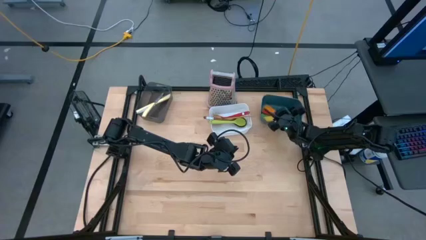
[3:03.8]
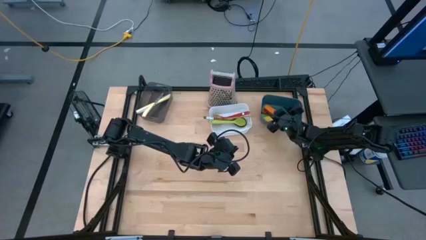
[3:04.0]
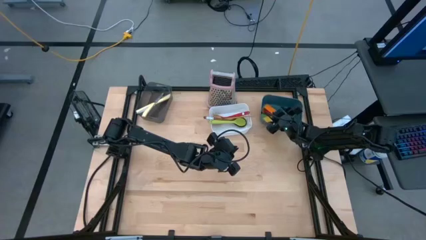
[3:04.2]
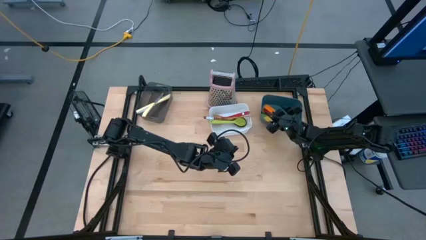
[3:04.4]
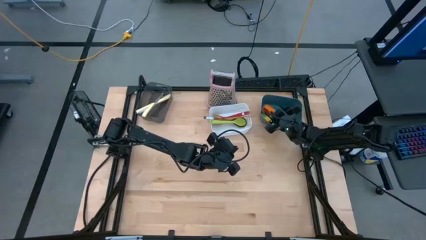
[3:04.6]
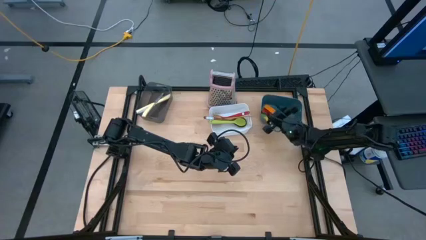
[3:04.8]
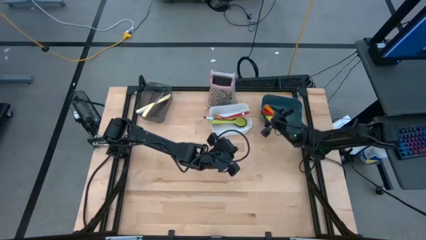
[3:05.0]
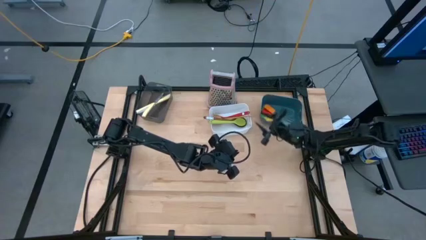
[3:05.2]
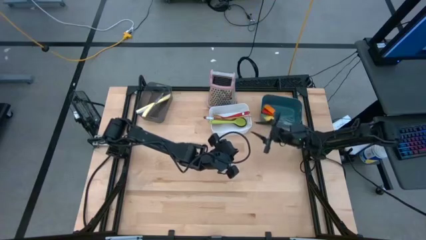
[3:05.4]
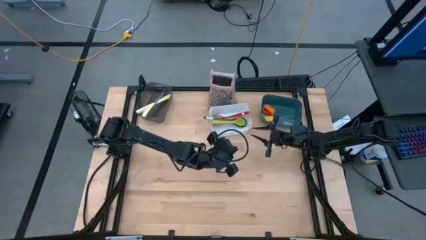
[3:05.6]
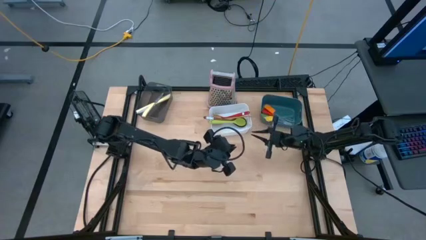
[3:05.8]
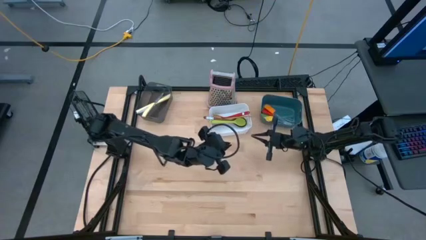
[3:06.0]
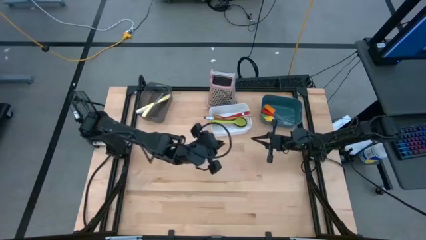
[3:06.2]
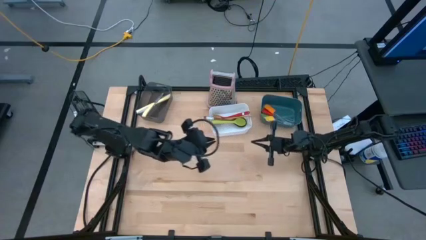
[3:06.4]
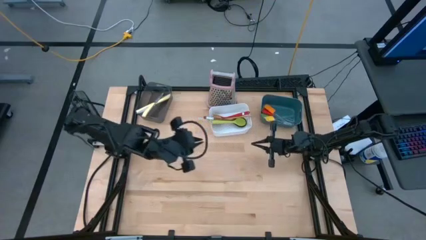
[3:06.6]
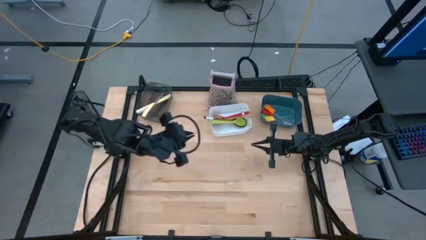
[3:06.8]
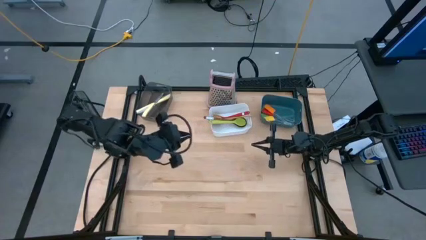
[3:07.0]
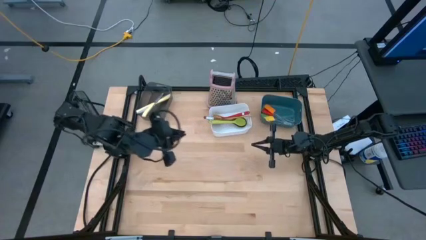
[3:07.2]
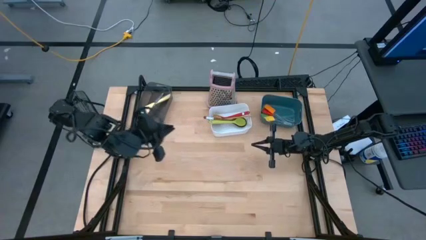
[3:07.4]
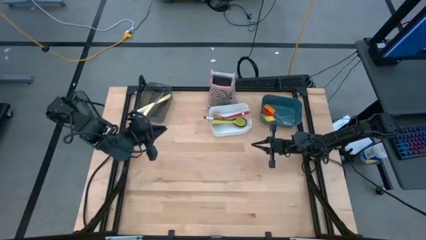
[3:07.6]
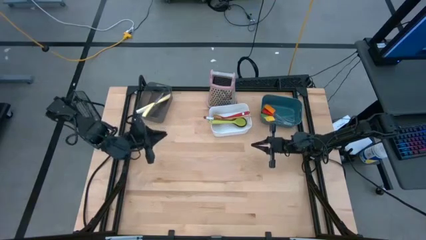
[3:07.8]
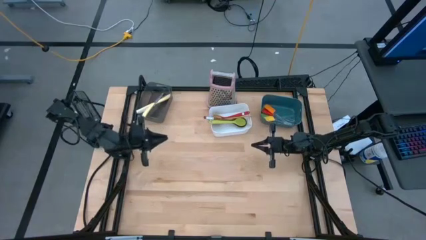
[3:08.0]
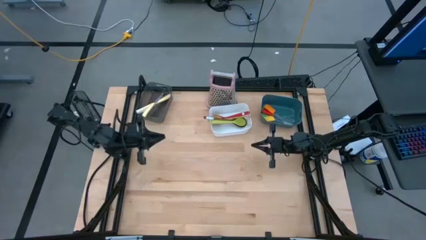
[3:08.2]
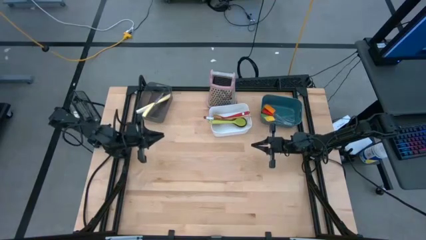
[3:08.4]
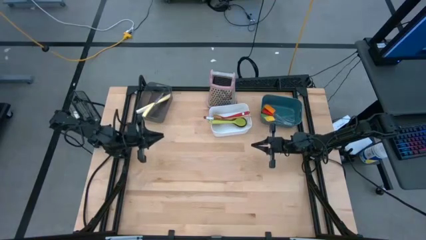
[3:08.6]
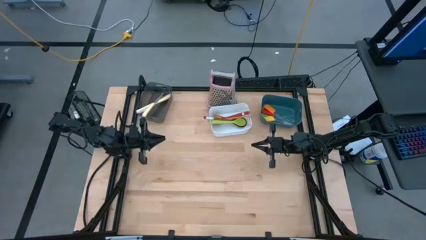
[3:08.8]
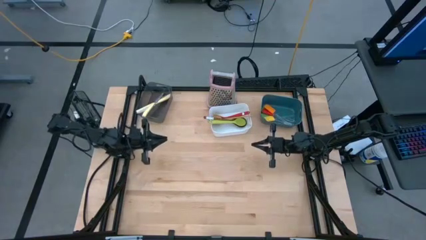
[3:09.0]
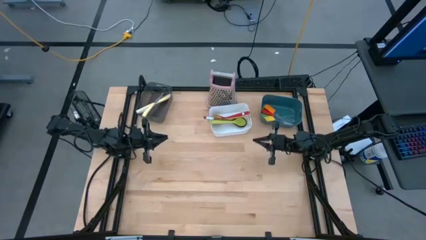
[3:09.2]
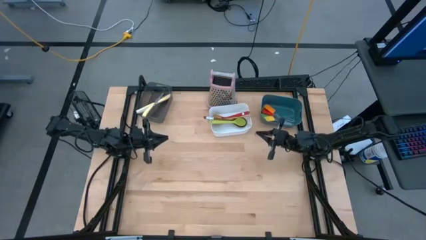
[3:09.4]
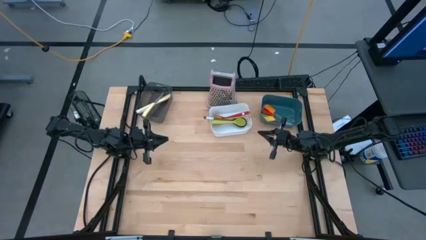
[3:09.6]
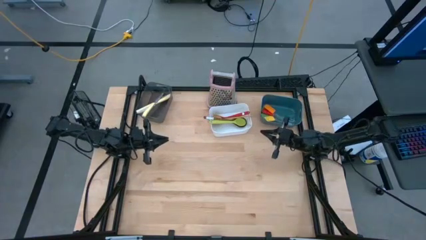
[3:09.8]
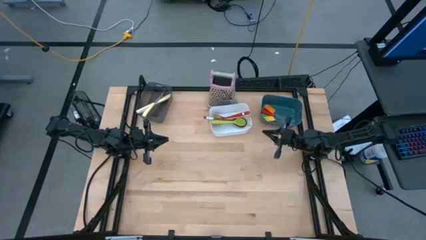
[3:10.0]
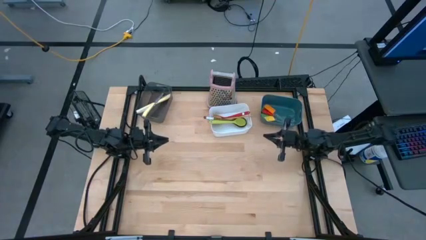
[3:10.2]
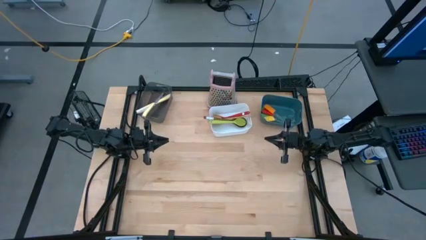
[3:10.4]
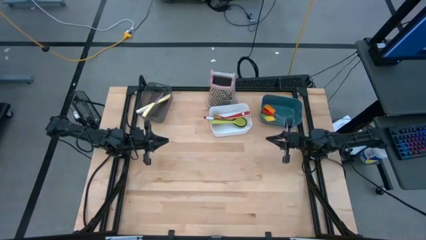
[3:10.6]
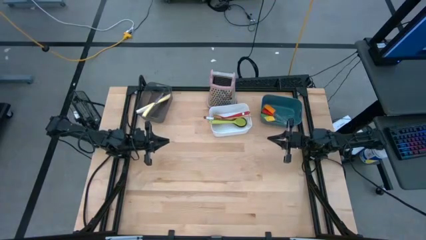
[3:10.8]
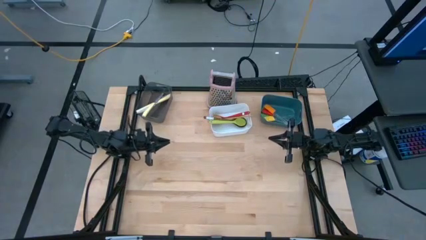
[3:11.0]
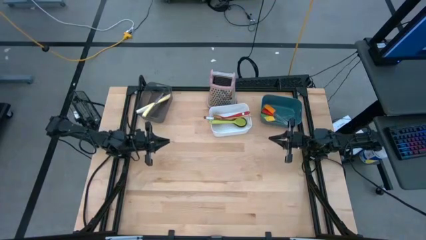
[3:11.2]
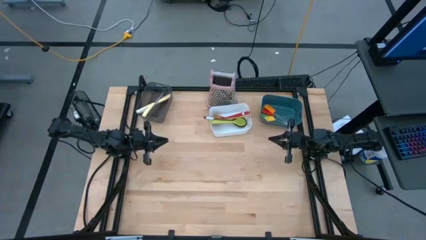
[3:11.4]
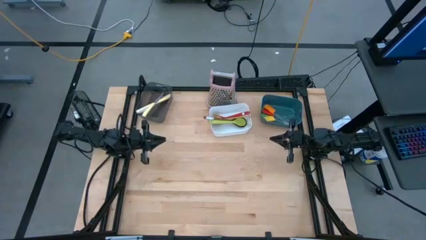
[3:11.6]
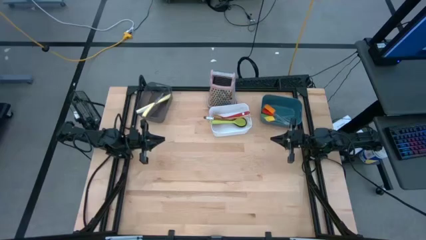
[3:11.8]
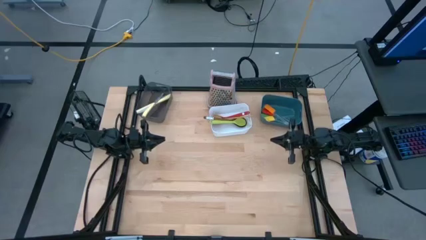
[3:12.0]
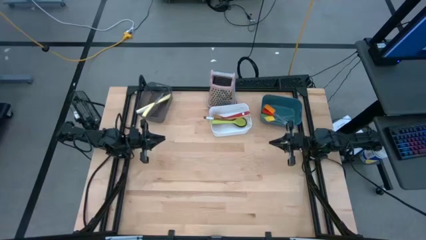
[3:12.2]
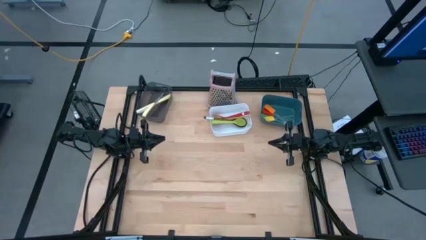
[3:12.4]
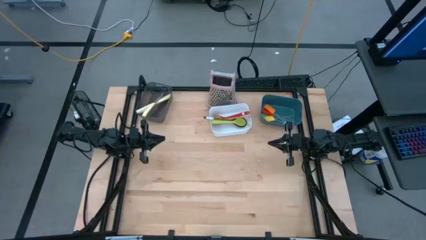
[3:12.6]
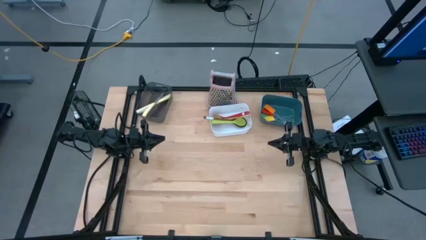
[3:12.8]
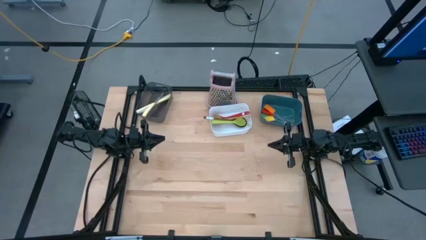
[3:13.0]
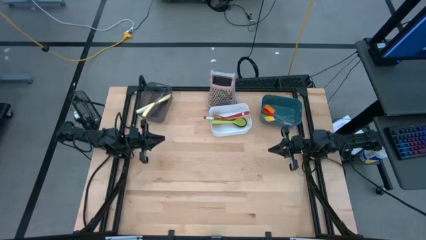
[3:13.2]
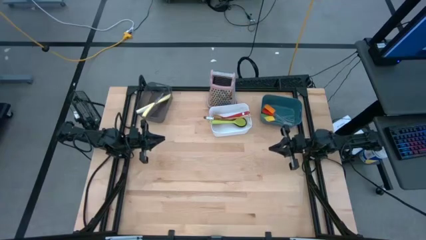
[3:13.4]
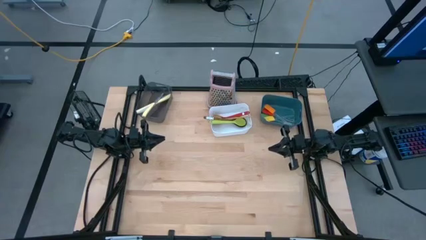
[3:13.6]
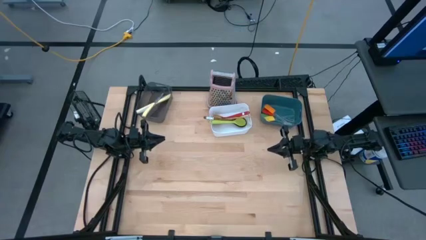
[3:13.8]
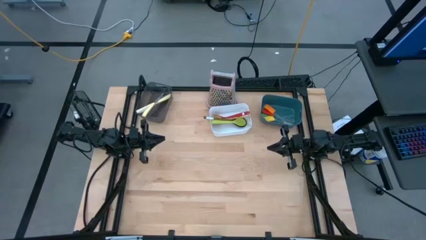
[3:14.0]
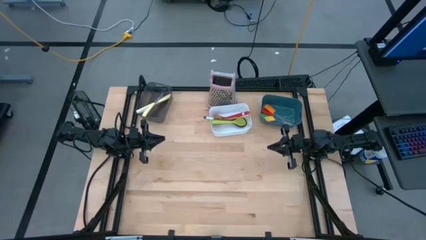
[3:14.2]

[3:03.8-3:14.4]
Task: Pick & Place Kitchen Items
Return to Home Position

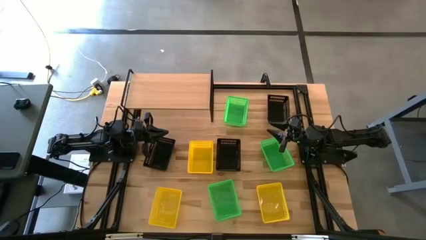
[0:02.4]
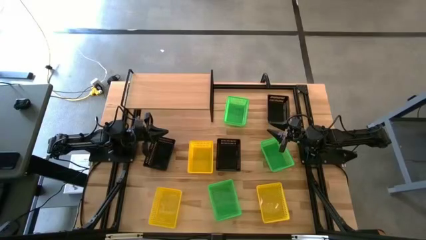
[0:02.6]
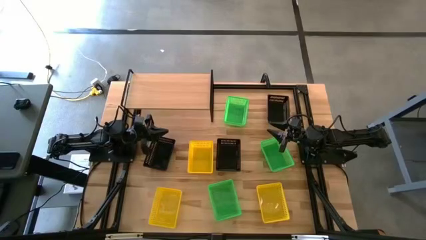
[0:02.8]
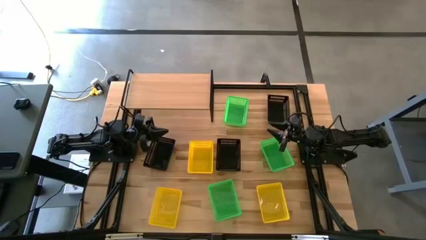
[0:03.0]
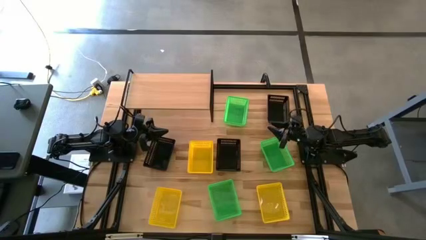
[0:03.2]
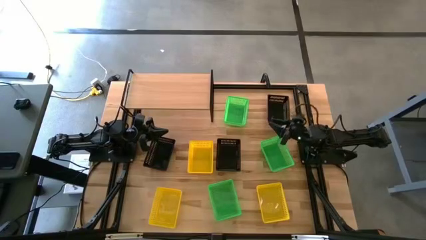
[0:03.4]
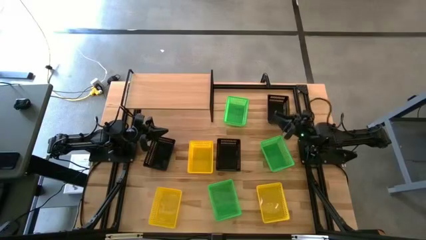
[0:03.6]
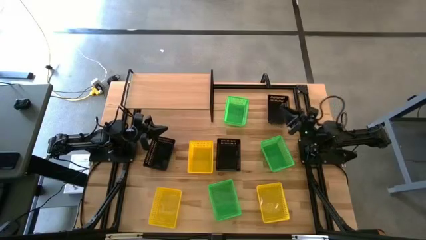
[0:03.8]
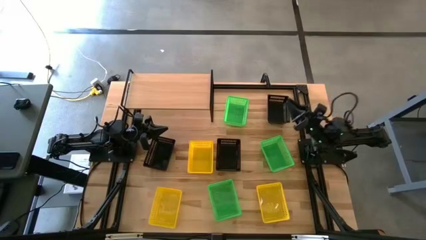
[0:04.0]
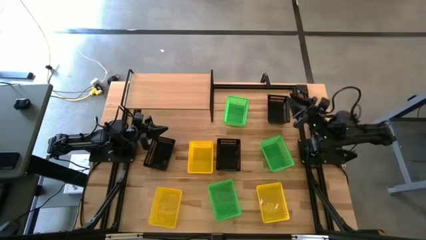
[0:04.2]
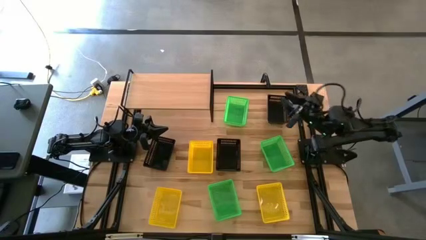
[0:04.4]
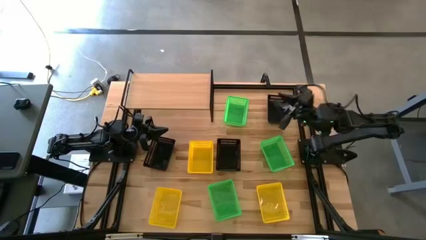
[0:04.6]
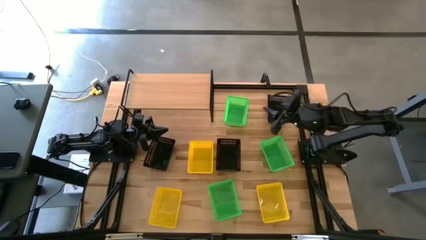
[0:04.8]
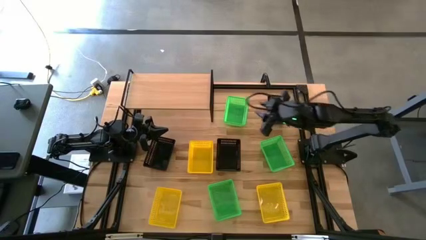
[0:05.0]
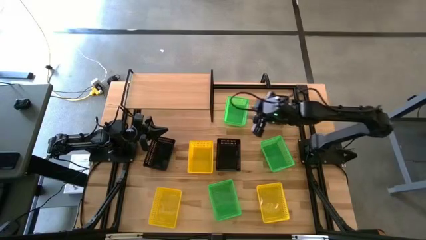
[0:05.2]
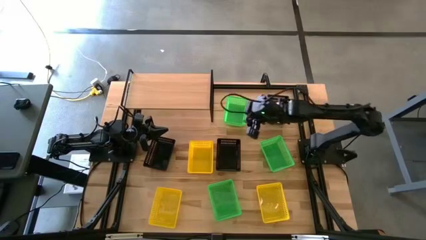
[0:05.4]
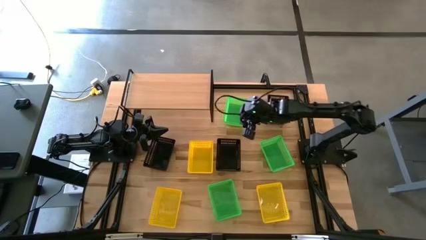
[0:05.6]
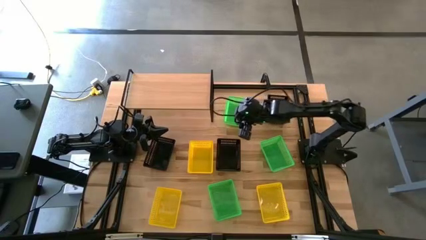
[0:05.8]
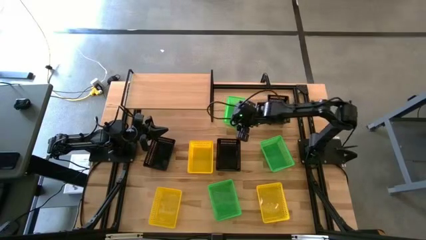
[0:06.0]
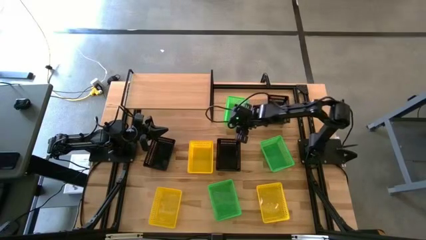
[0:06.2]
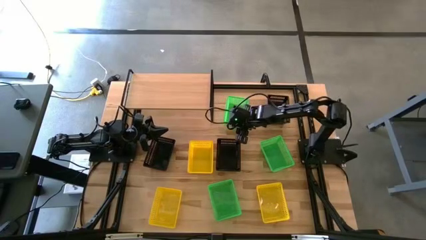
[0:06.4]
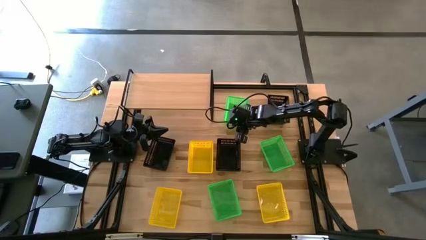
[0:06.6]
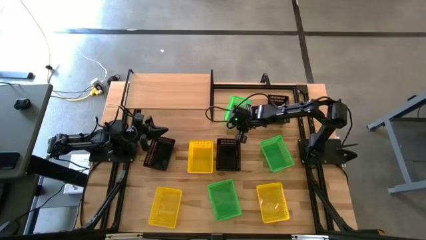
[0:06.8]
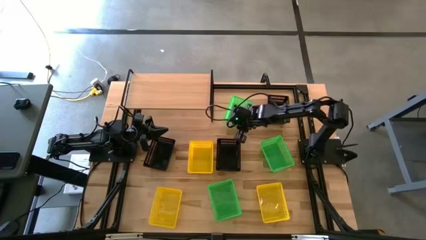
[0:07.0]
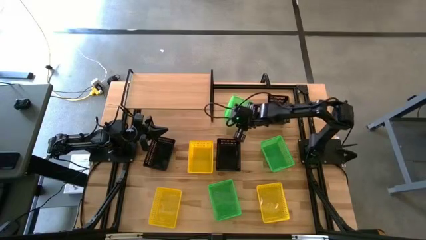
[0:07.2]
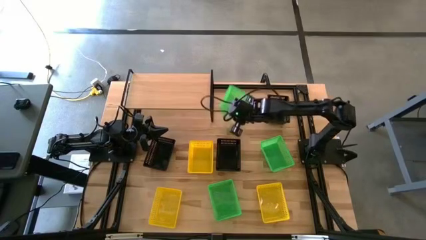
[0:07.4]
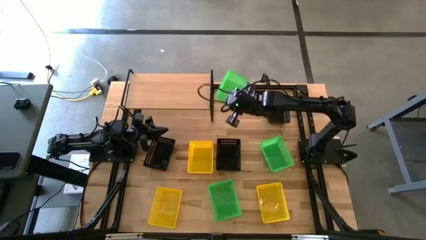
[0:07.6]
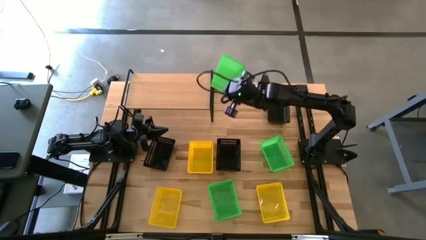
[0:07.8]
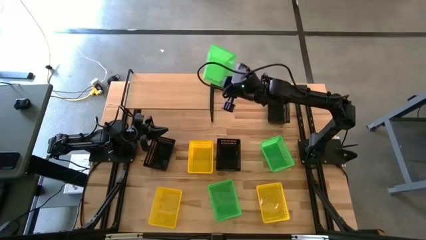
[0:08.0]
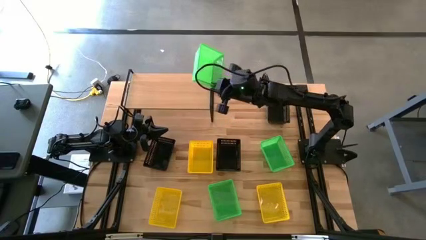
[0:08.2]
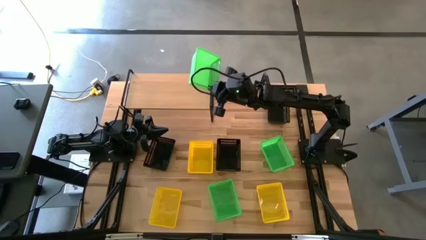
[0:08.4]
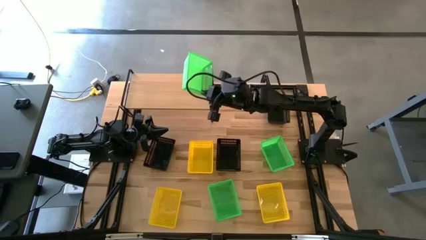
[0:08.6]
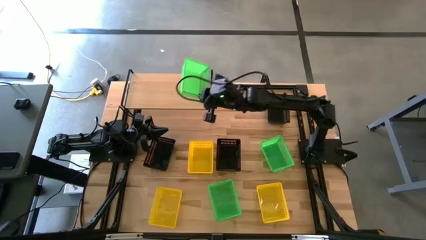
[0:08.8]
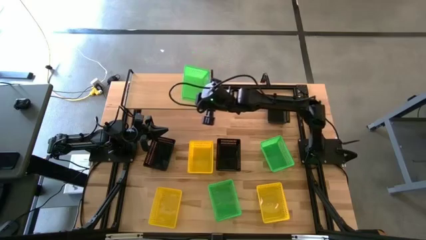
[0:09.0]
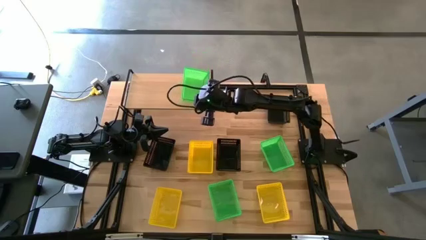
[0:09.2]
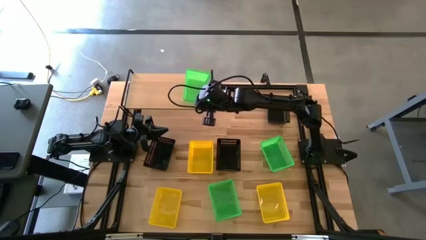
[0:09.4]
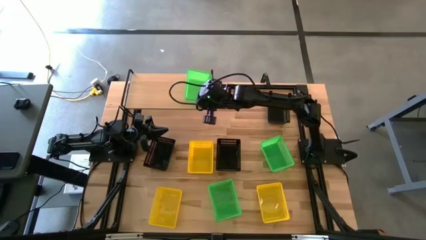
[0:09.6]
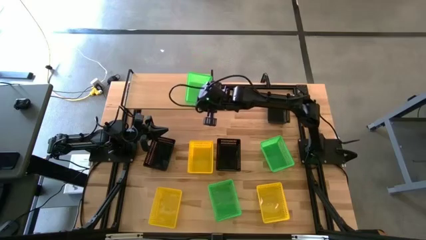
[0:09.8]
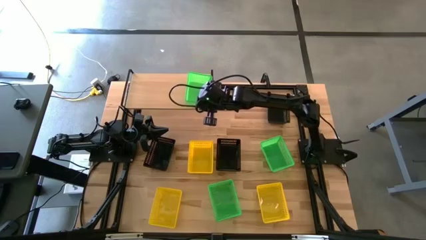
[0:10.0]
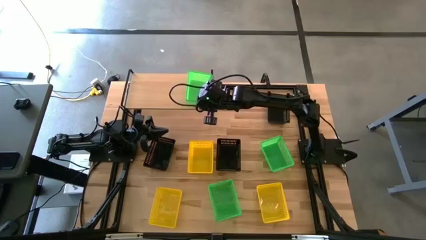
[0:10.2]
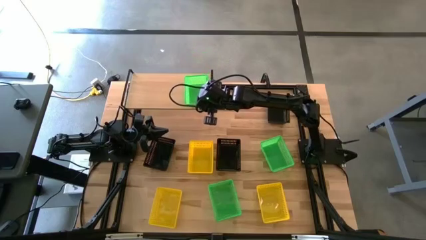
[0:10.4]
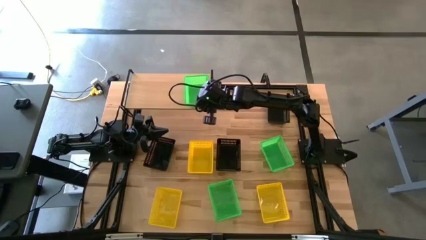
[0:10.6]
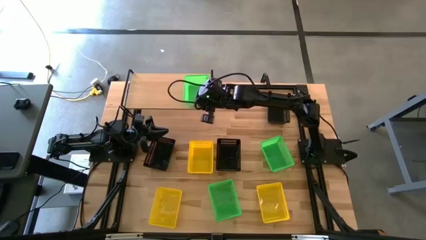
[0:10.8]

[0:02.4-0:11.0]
Task: Stack baskets on shelf by color
Put the top green basket on the shelf
